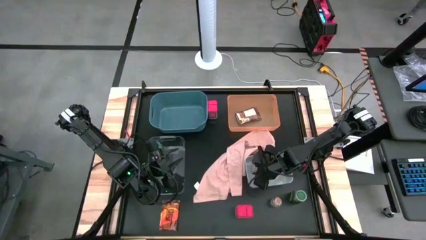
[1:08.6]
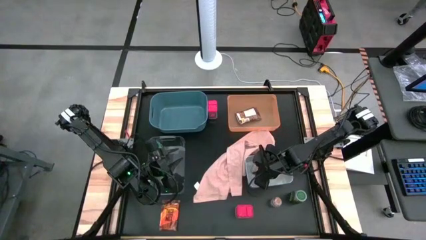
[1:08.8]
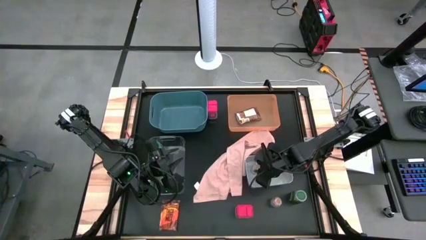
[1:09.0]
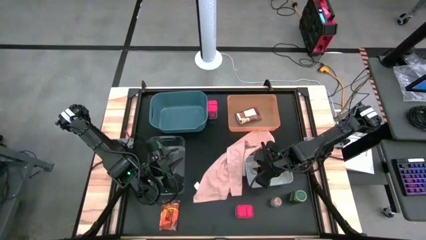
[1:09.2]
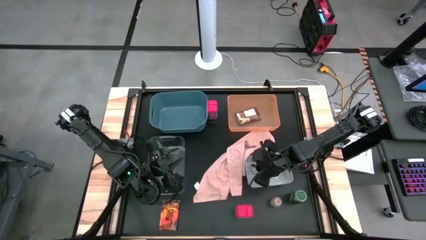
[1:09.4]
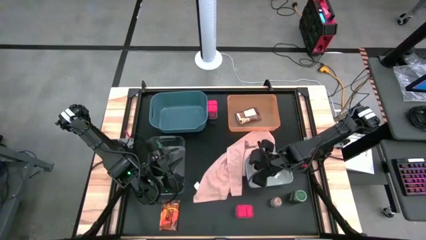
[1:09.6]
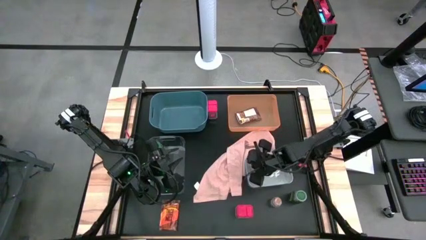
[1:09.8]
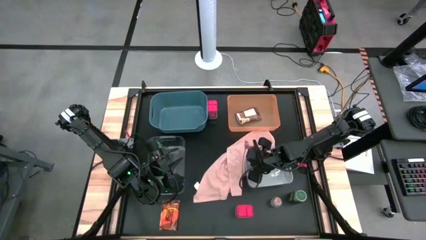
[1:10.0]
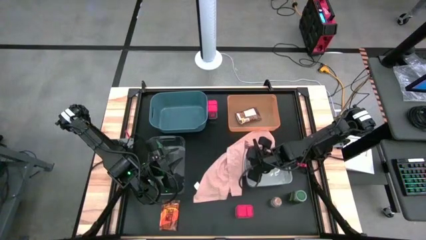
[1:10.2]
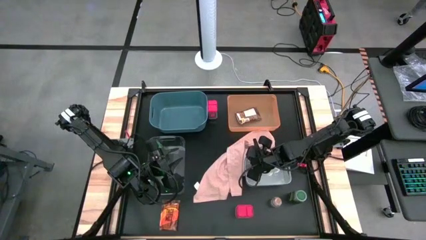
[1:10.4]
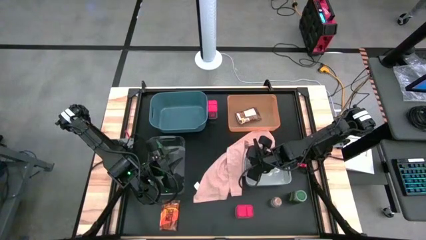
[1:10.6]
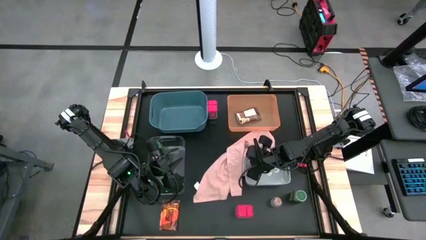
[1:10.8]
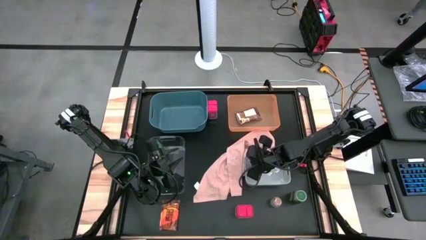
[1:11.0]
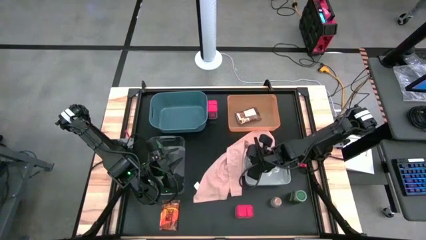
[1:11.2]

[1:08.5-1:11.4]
Task: Sort spices by type
Adjust the white bin on the table

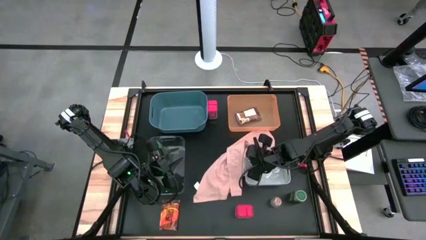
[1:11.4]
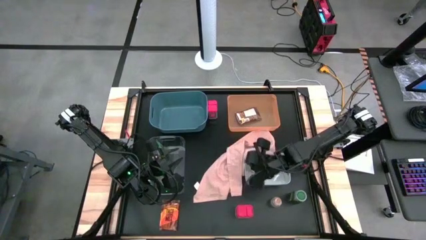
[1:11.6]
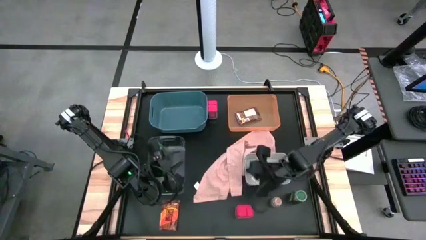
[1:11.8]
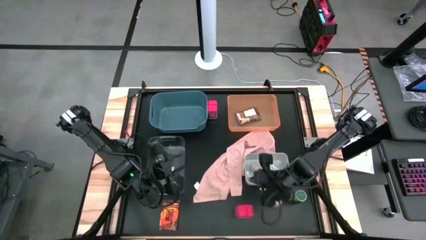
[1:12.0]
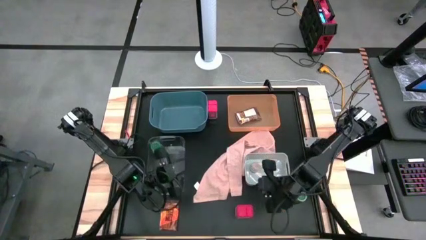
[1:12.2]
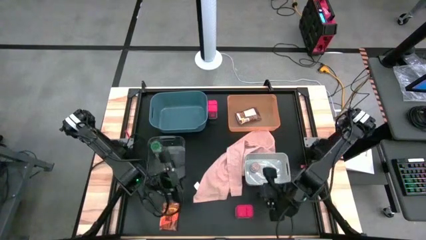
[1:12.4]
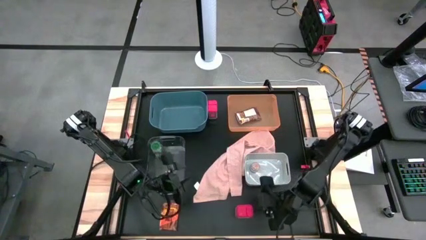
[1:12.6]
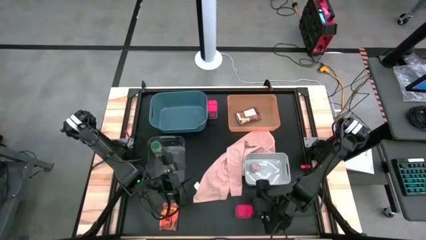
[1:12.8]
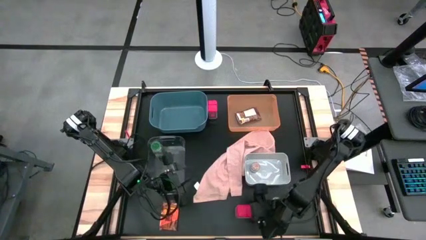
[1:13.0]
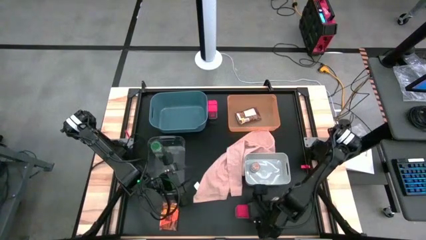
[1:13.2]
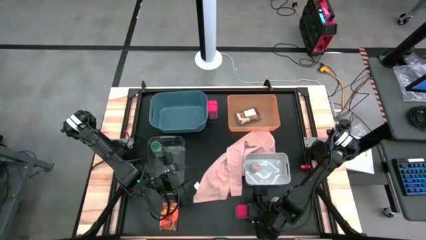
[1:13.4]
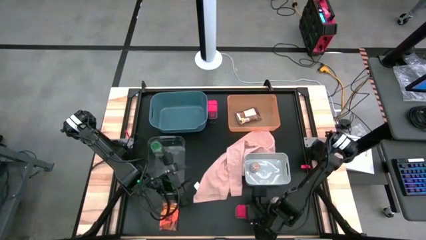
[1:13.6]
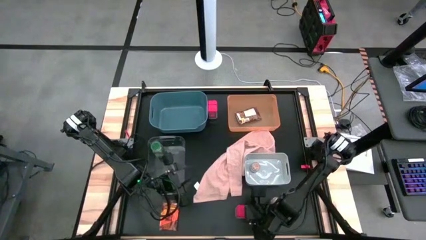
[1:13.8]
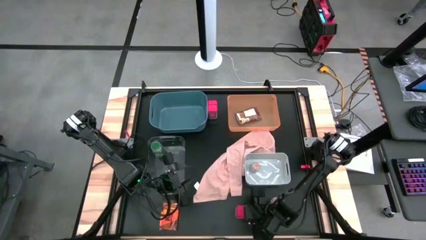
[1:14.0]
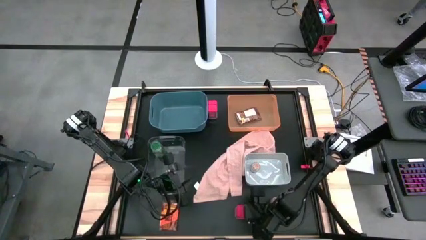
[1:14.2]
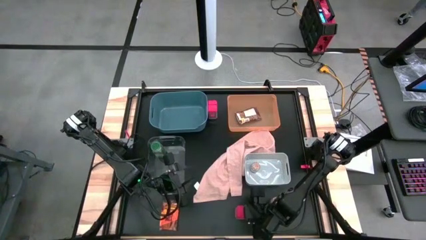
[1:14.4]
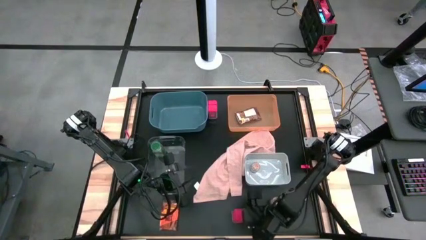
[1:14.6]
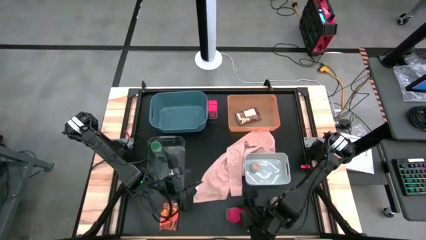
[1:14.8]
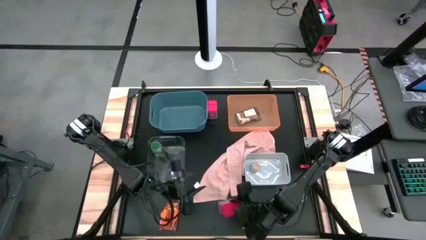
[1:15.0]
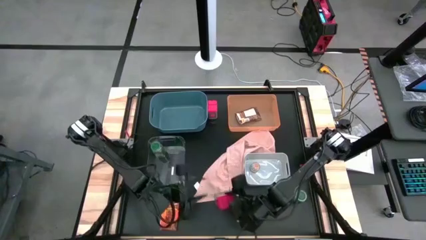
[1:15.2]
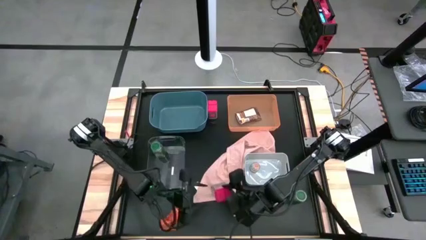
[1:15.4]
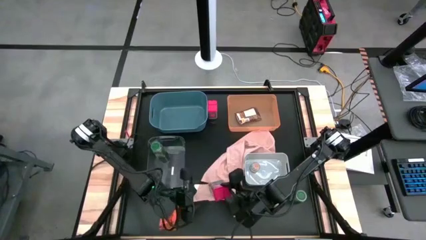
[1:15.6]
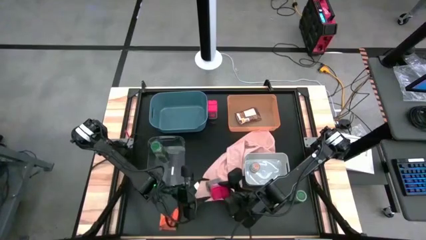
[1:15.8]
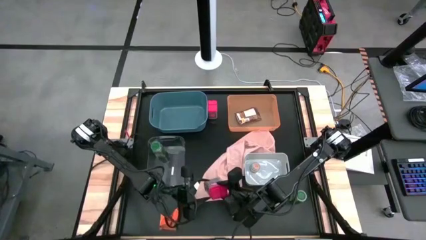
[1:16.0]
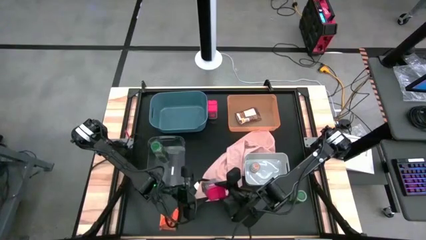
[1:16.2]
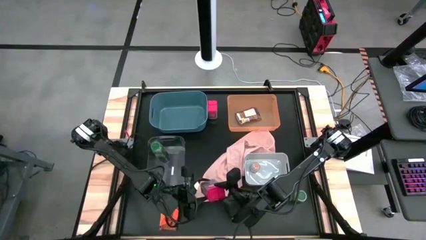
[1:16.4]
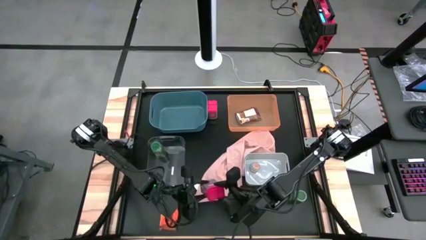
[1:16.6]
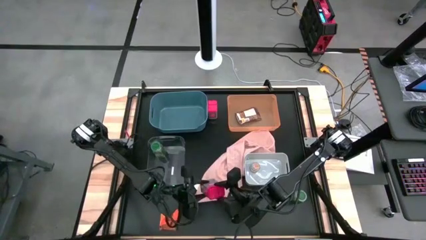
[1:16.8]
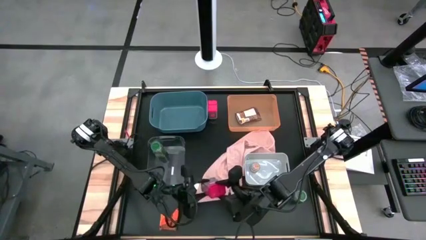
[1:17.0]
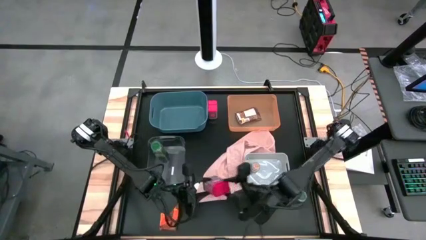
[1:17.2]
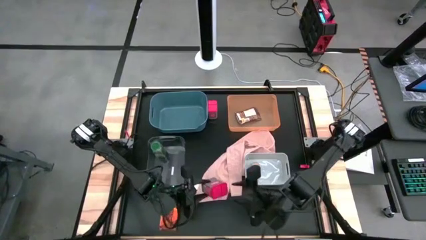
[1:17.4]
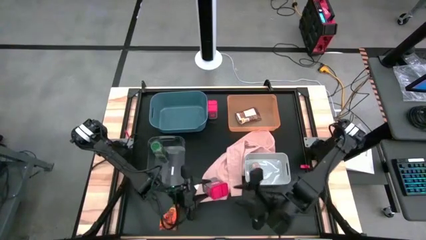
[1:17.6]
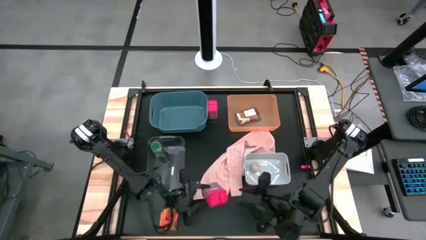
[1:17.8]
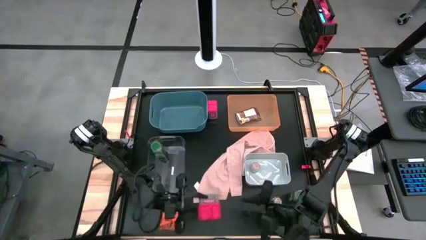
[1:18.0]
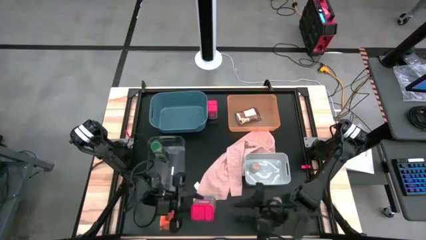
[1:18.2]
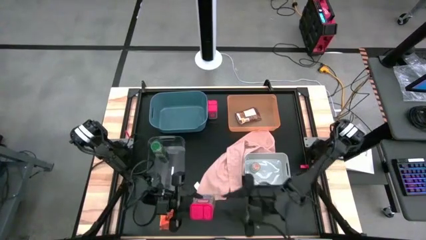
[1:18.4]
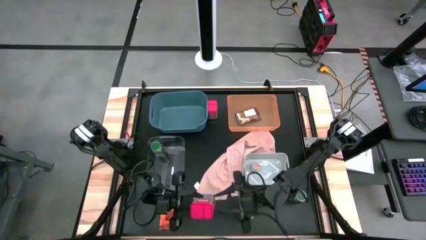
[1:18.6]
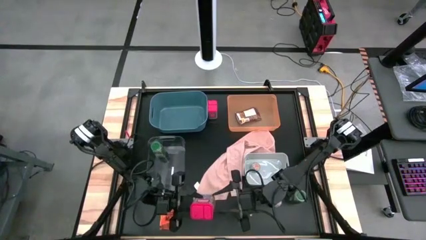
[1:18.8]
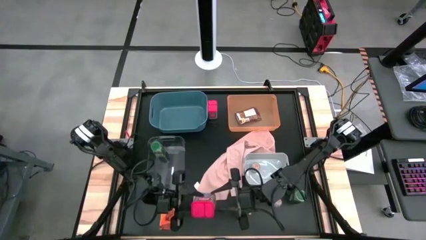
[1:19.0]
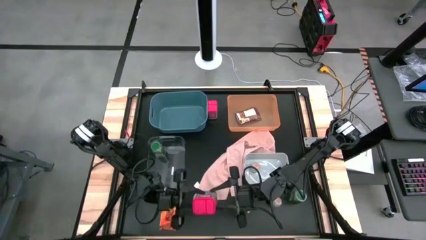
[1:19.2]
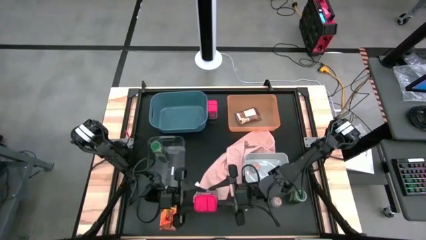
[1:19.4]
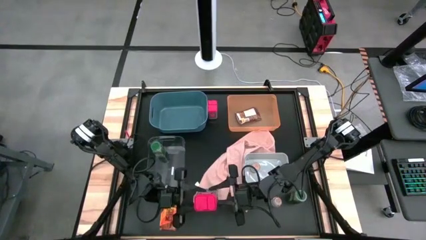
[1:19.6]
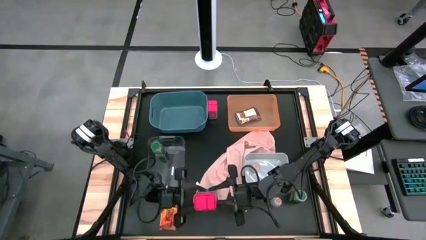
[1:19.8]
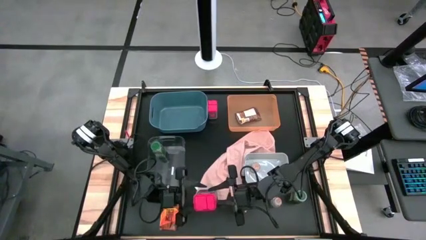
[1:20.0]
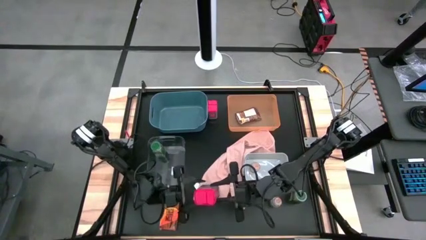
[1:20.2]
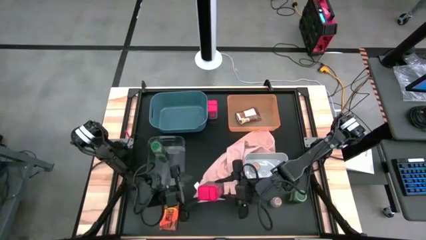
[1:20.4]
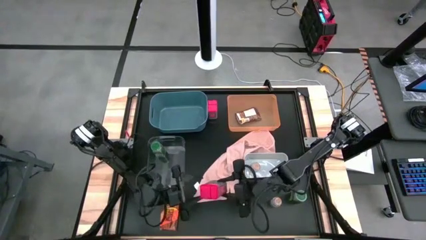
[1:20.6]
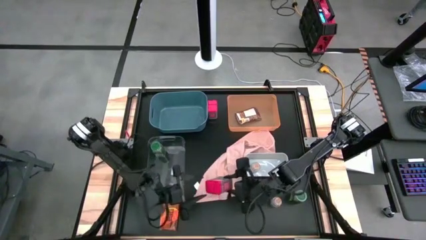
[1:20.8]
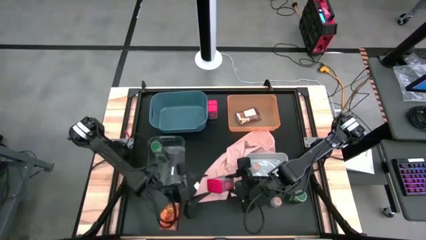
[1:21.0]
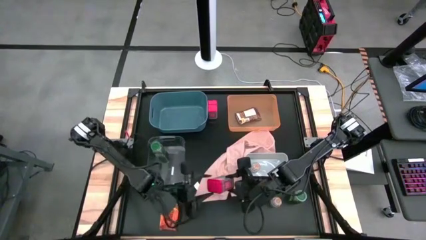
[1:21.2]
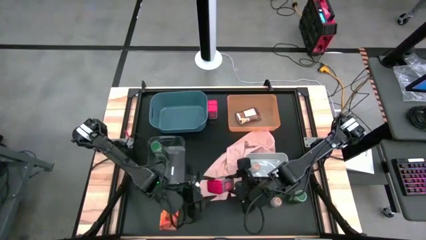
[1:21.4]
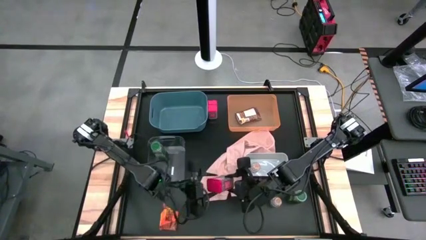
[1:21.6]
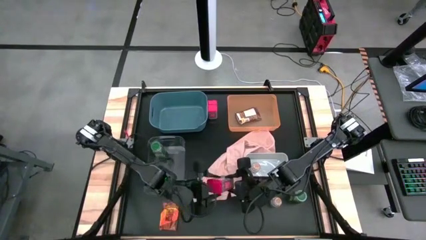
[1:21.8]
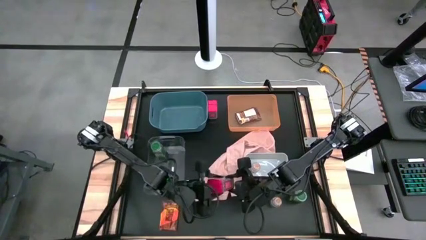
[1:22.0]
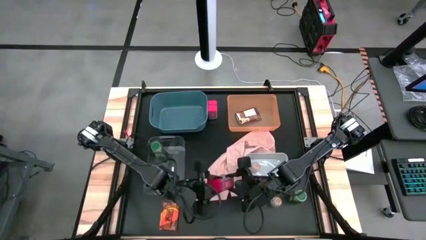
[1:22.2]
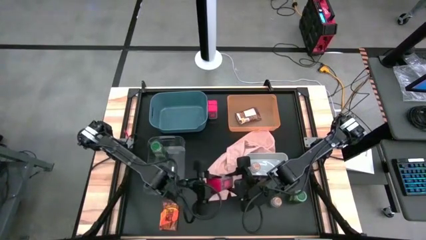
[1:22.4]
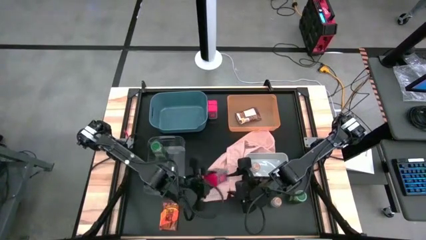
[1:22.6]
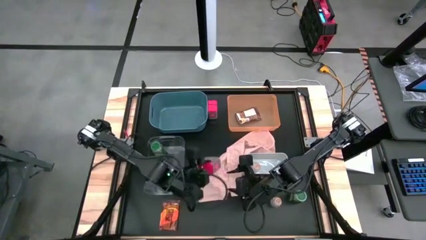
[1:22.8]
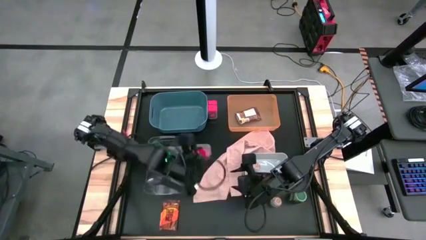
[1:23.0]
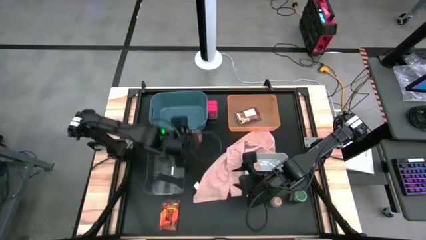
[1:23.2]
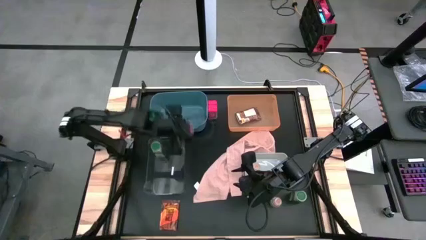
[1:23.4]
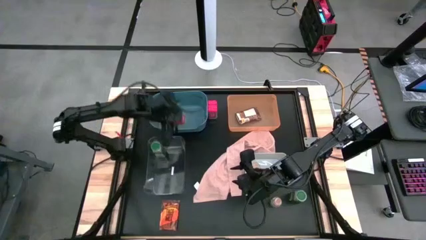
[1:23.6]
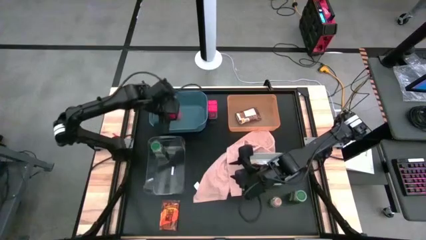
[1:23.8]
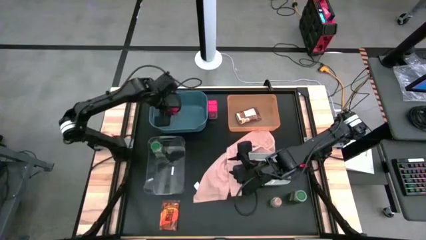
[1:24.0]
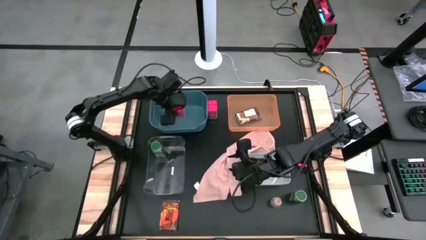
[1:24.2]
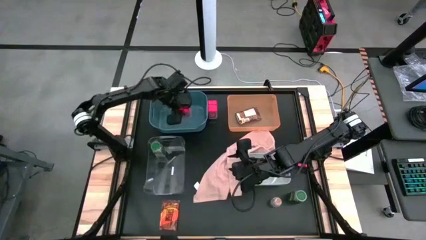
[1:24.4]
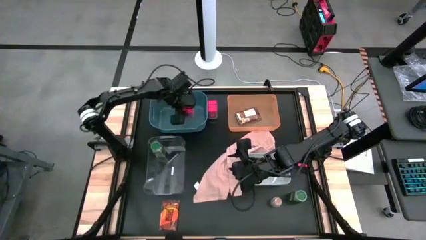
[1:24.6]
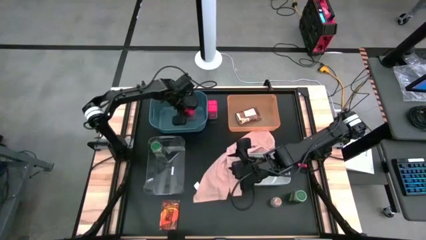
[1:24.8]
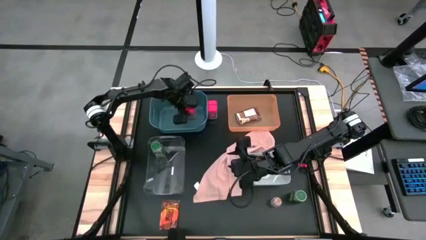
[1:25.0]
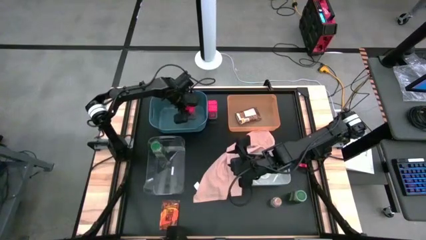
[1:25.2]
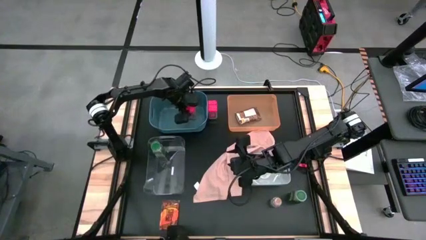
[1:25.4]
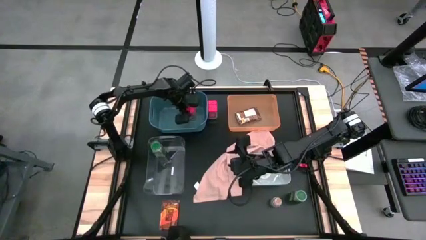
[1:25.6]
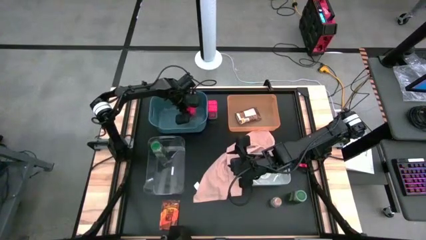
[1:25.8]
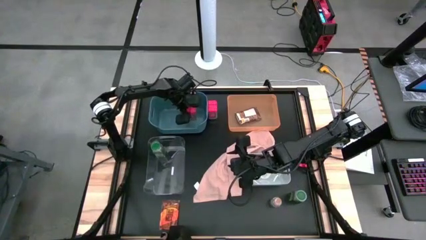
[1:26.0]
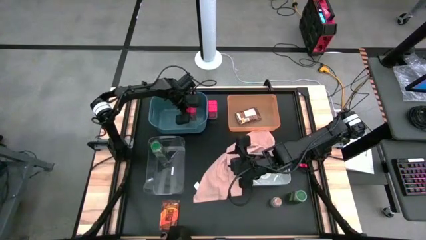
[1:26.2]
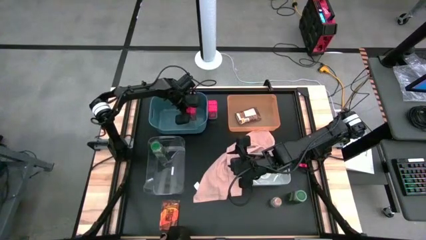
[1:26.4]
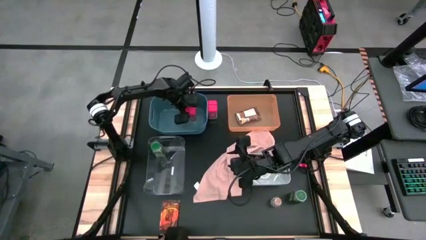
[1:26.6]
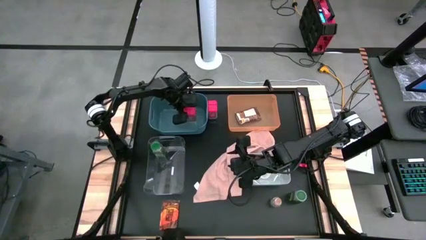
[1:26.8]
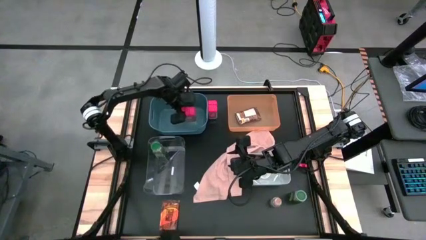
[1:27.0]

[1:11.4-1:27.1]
Put the bottom red seasoning can into the blue bin
